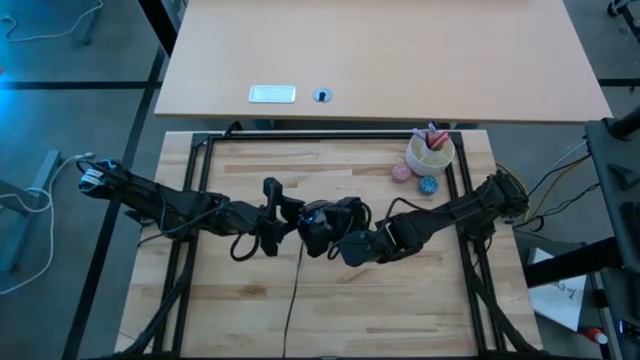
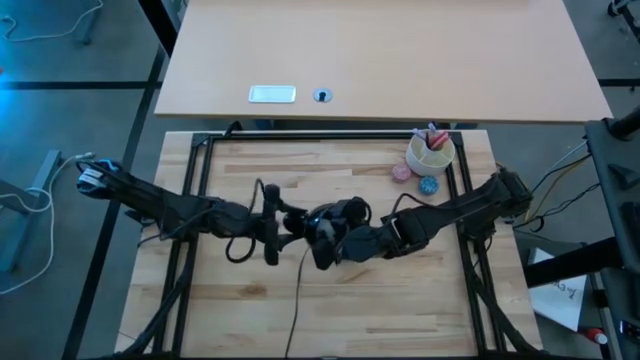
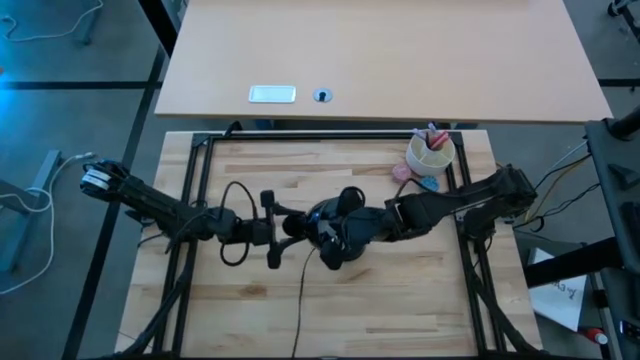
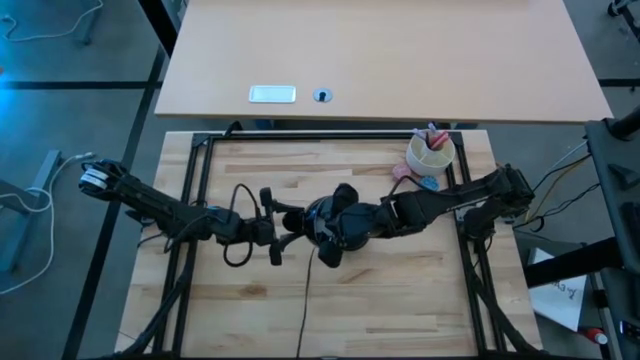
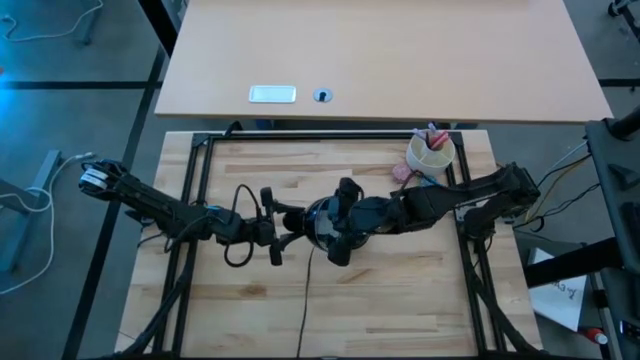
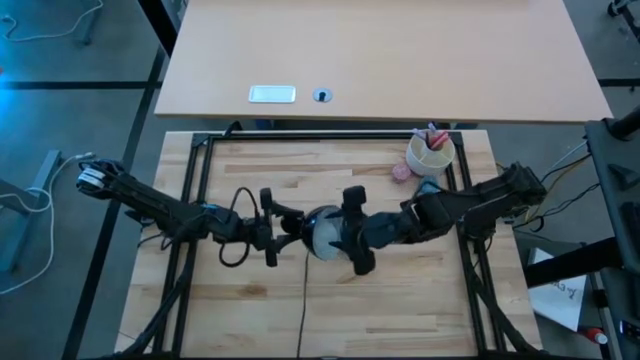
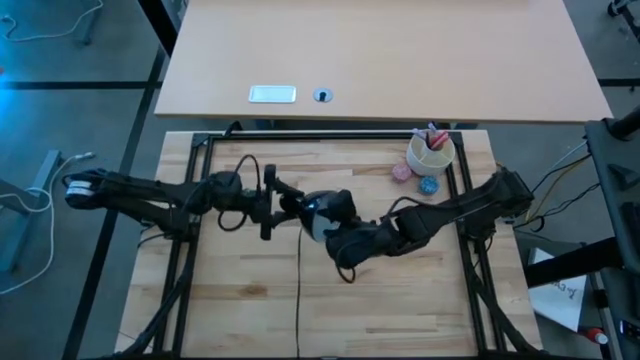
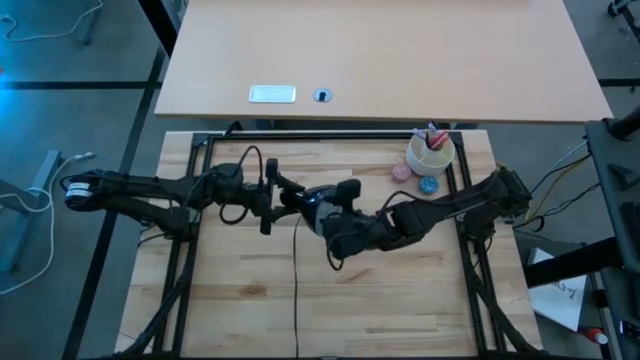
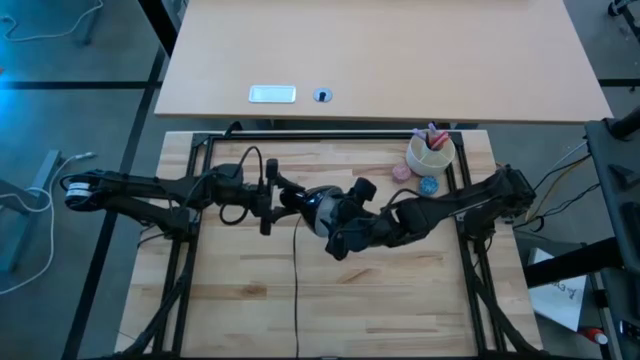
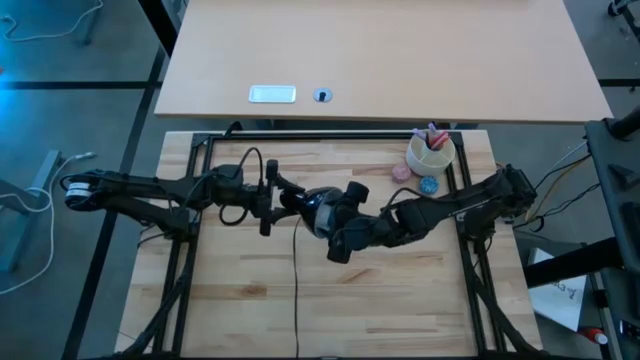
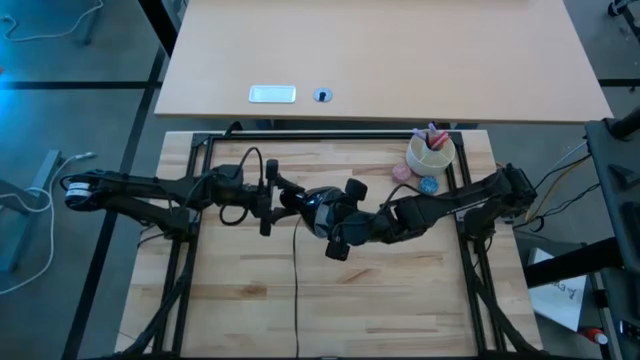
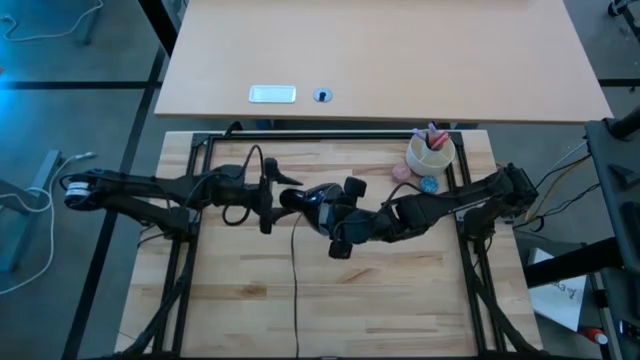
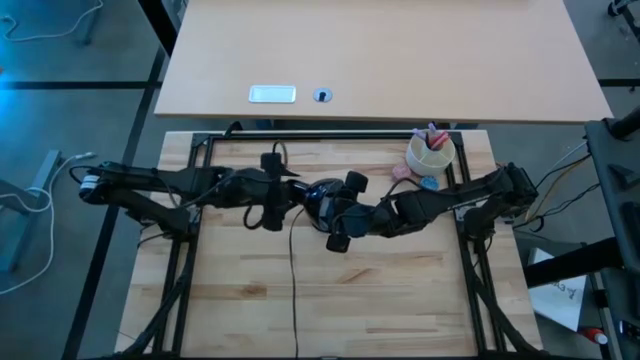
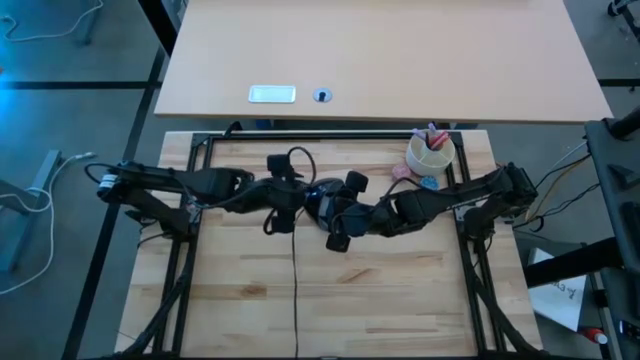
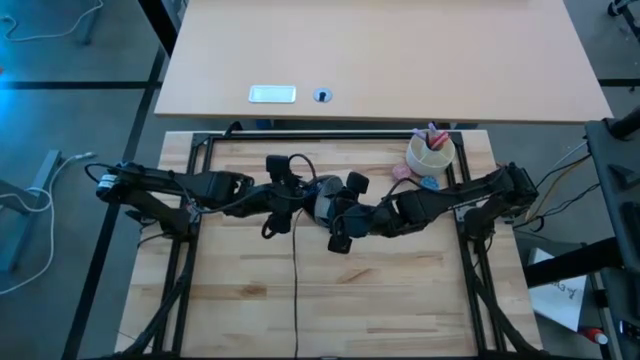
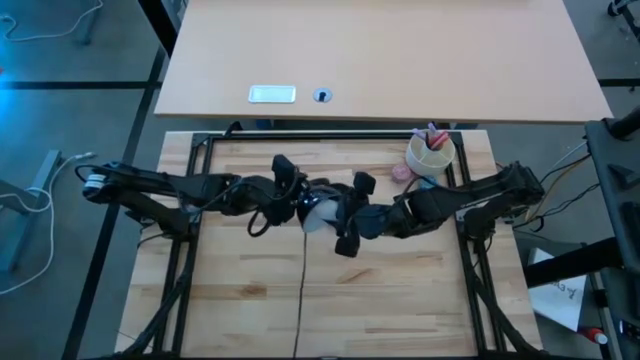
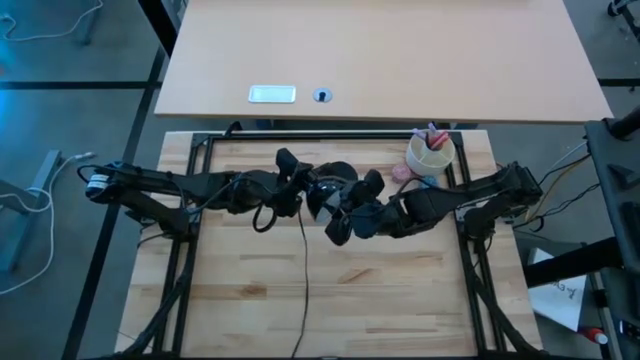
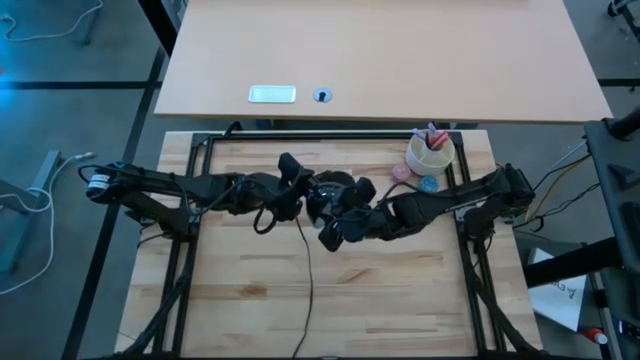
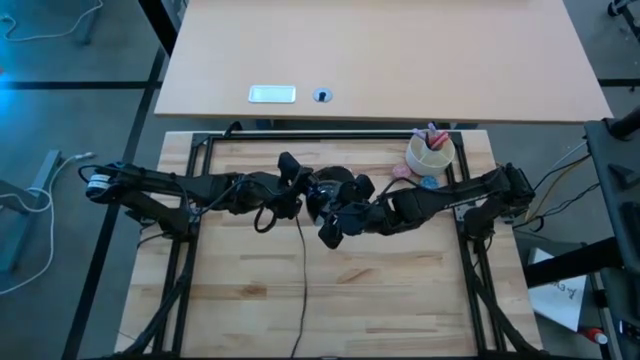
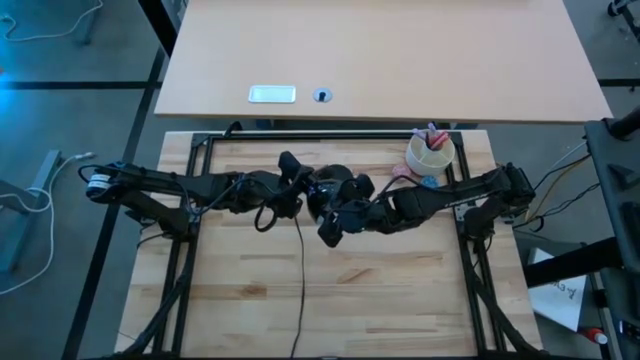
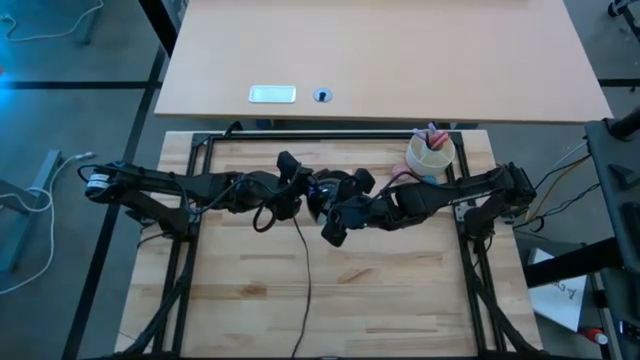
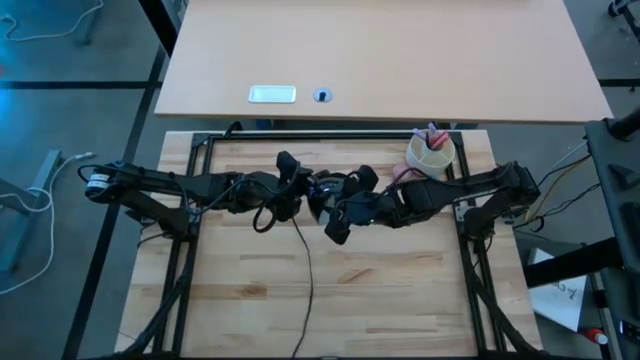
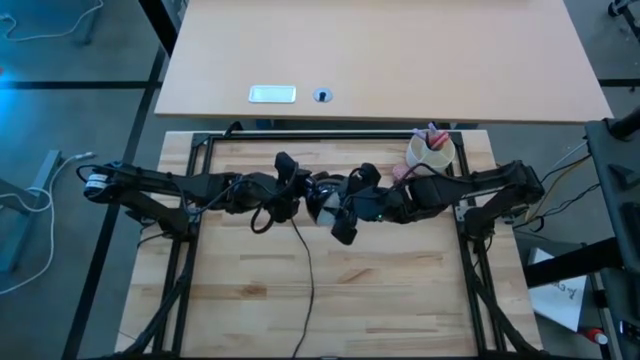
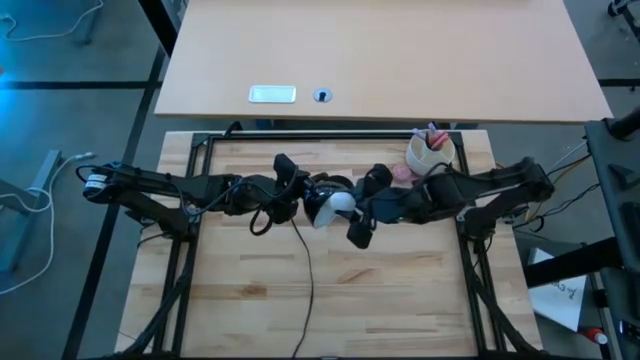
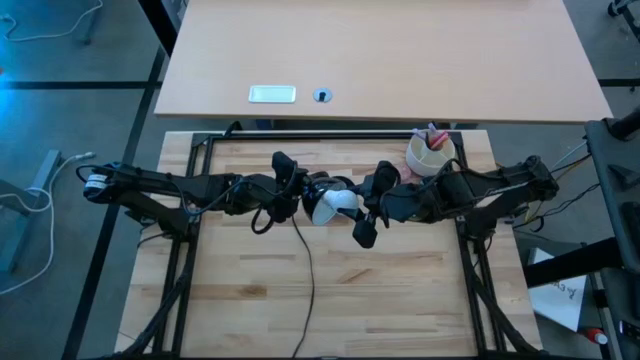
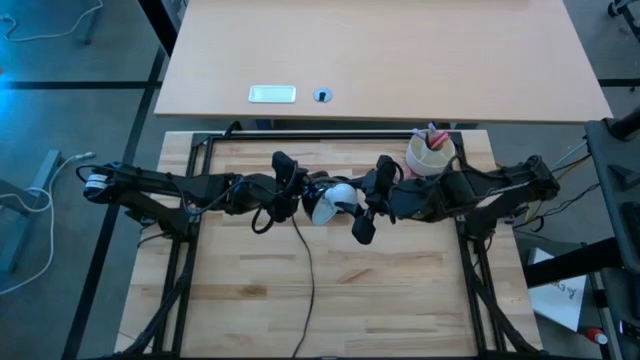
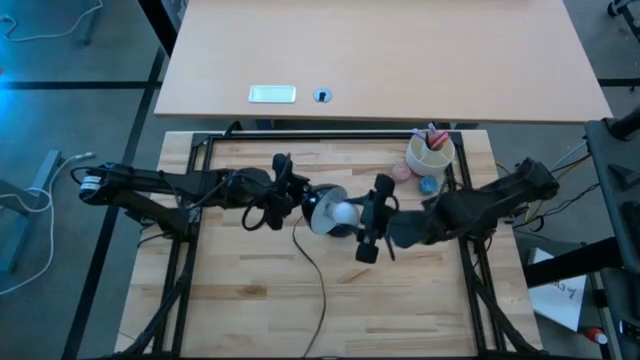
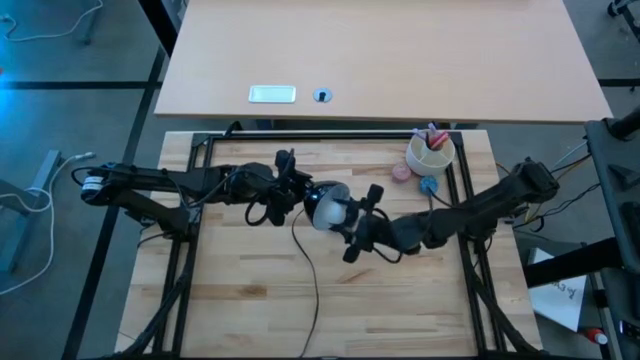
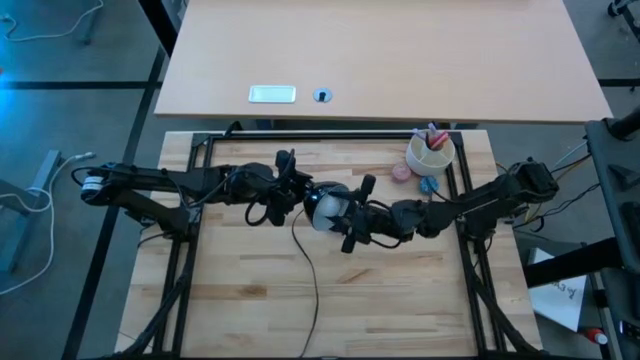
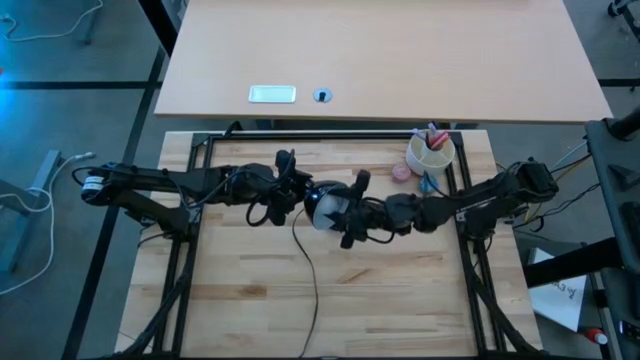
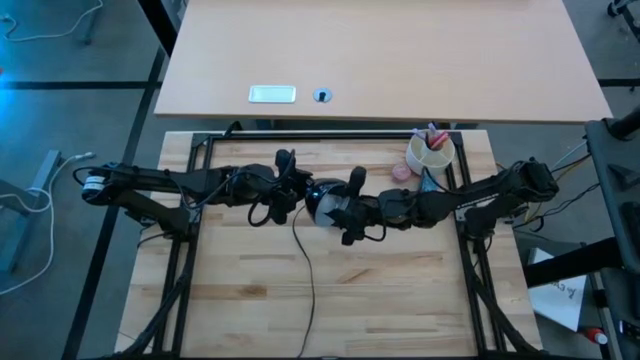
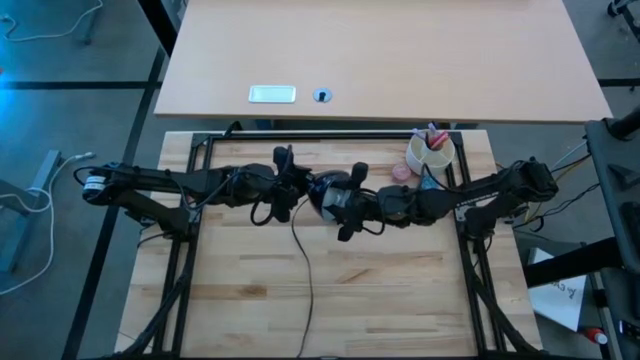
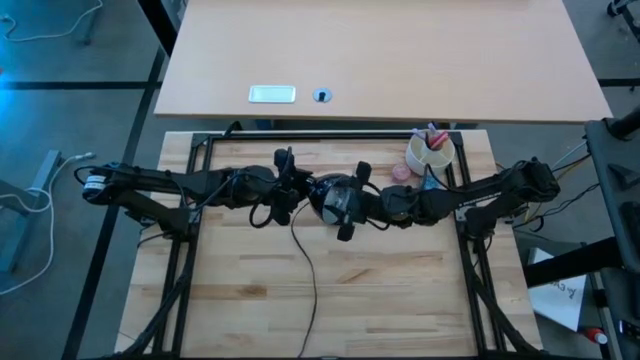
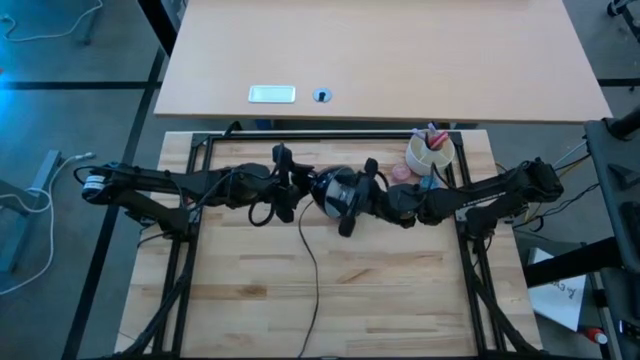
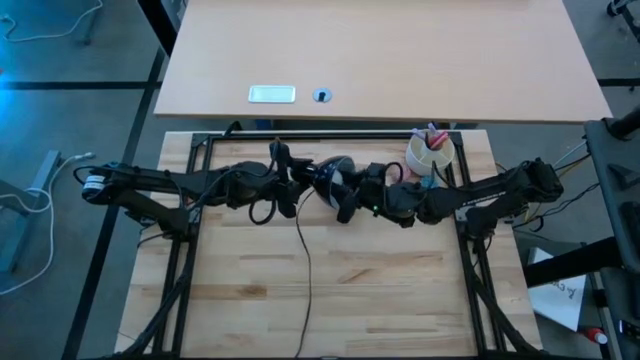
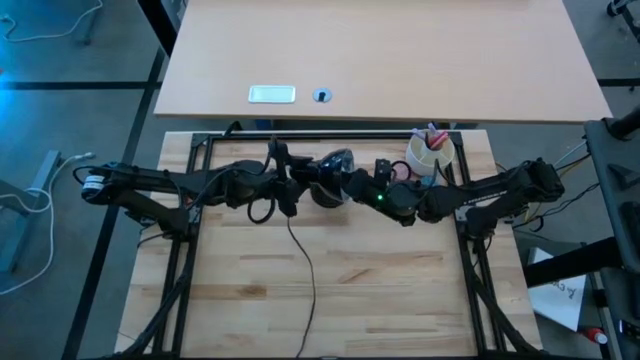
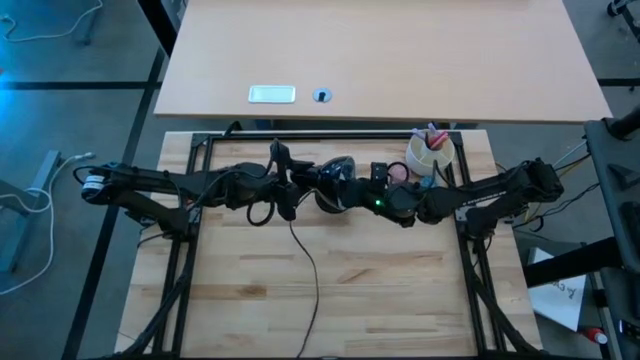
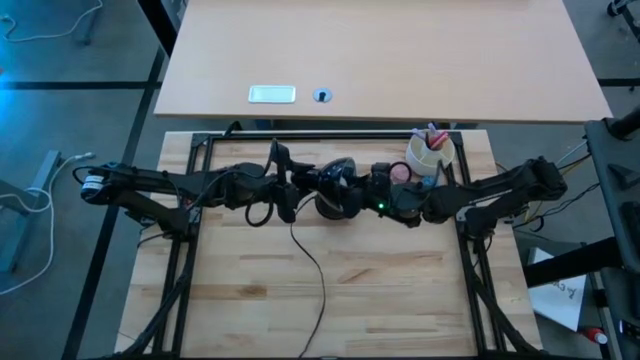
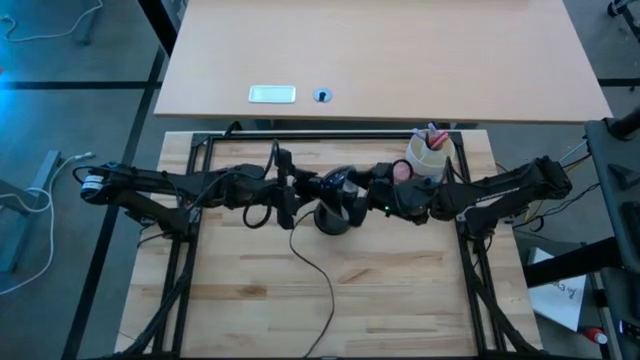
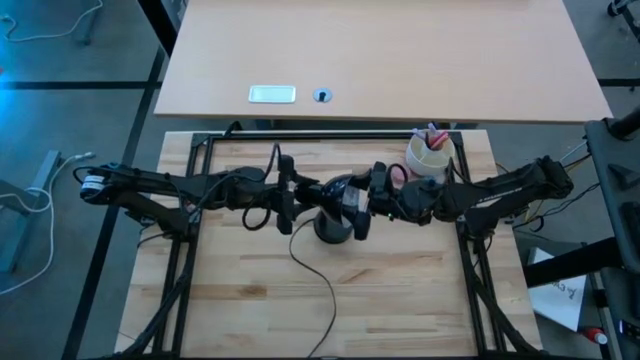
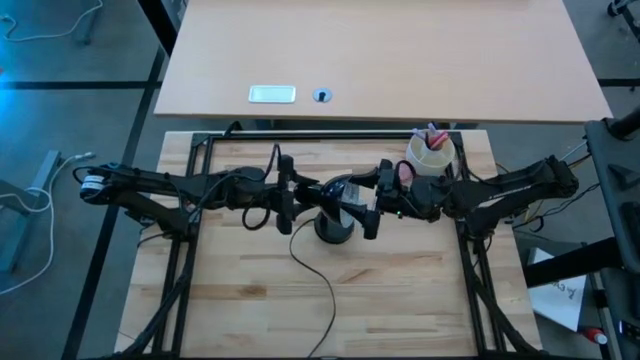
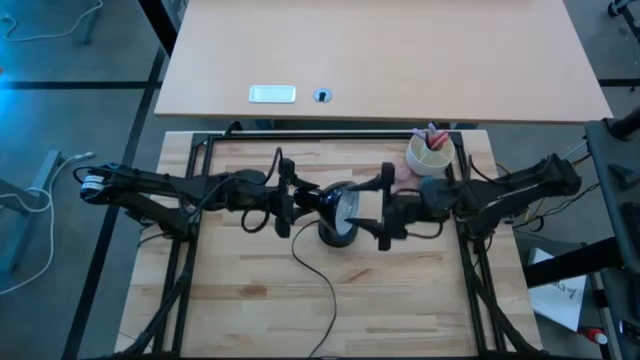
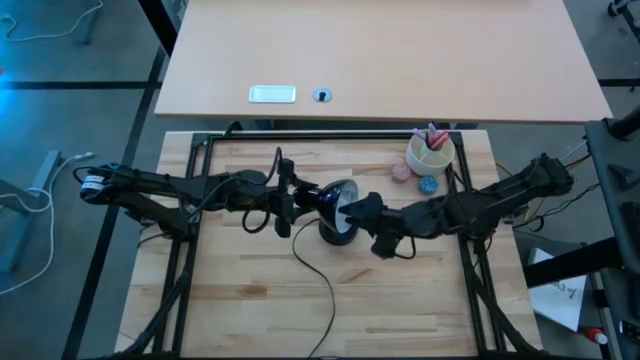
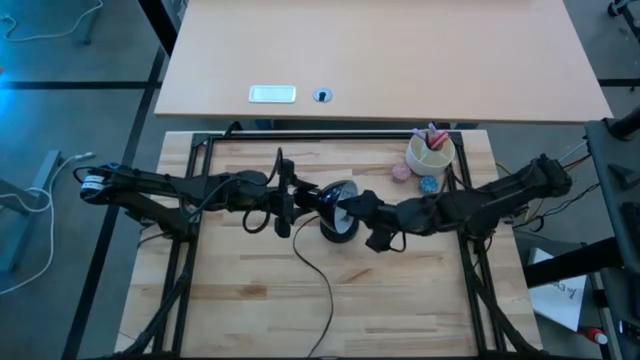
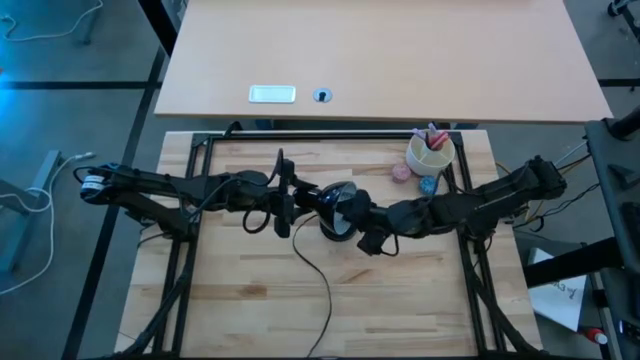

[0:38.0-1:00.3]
Task: Screw lightbulb
Insert the lightbulb into the lamp
